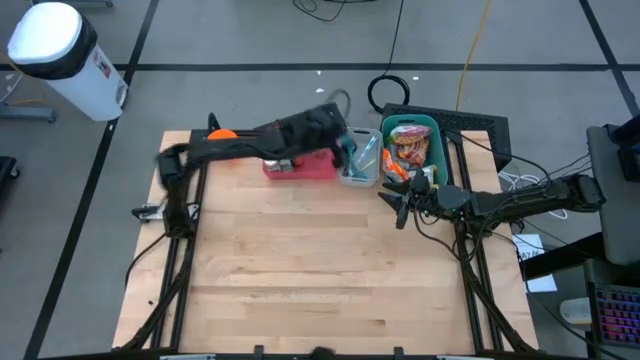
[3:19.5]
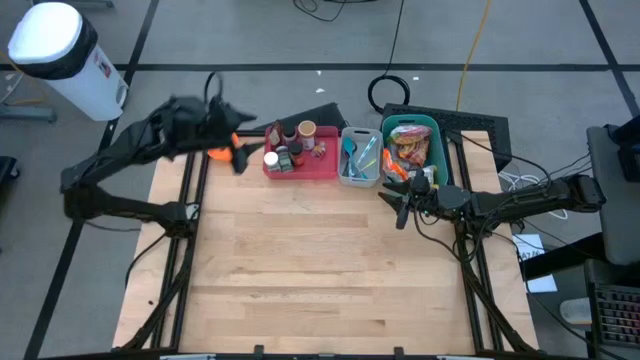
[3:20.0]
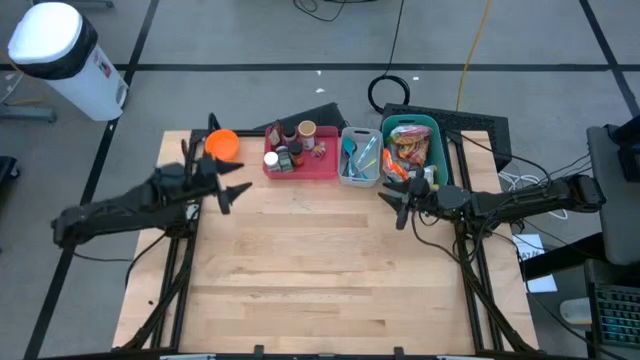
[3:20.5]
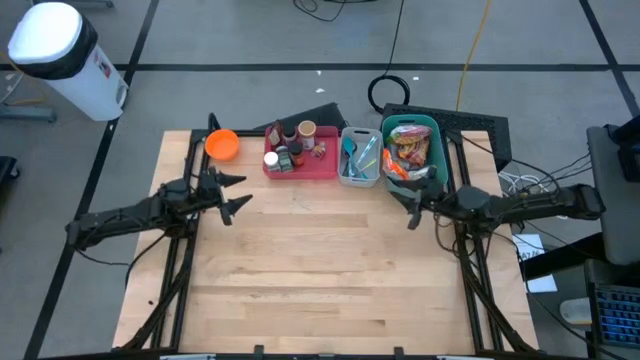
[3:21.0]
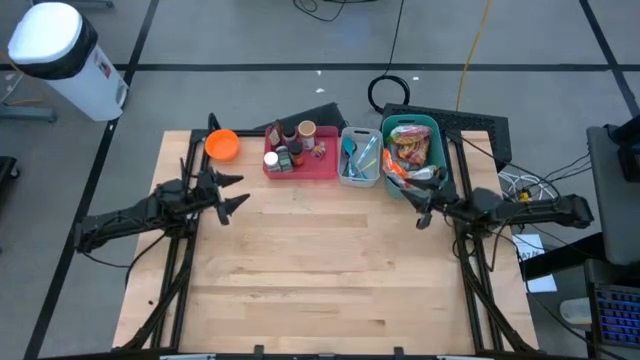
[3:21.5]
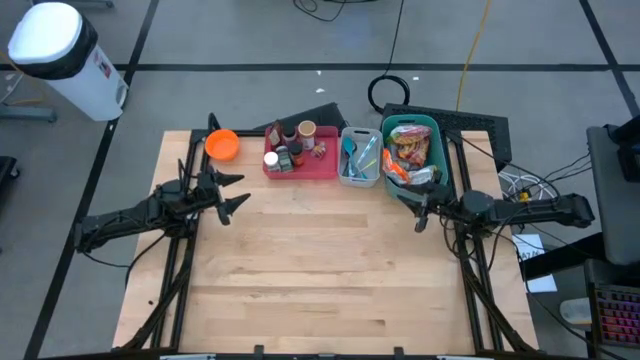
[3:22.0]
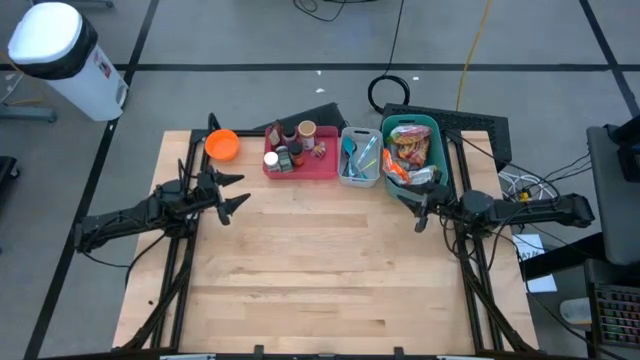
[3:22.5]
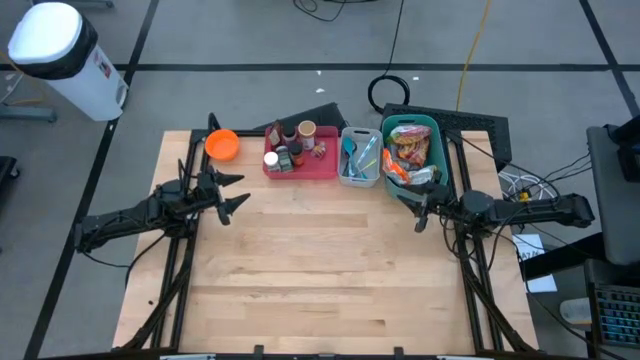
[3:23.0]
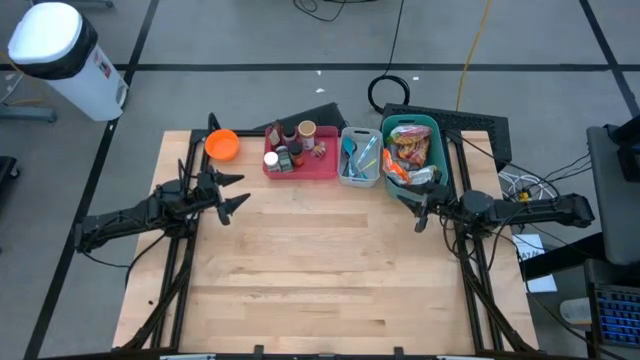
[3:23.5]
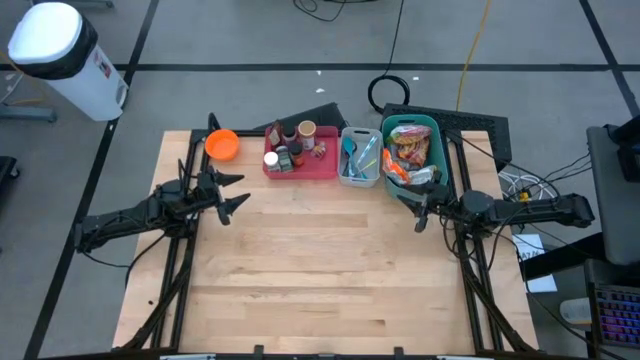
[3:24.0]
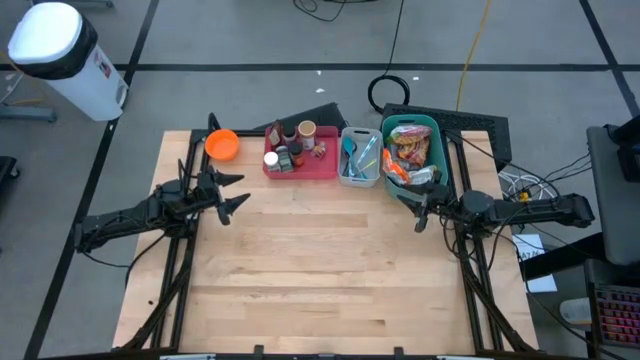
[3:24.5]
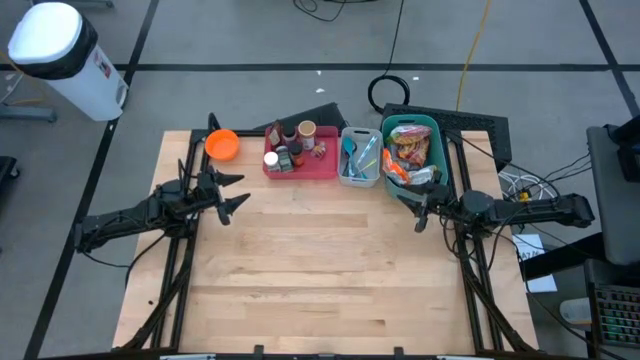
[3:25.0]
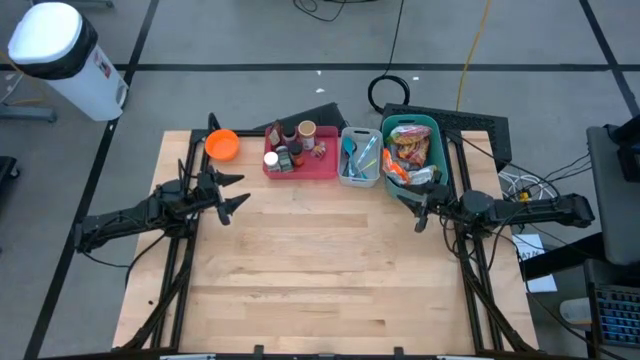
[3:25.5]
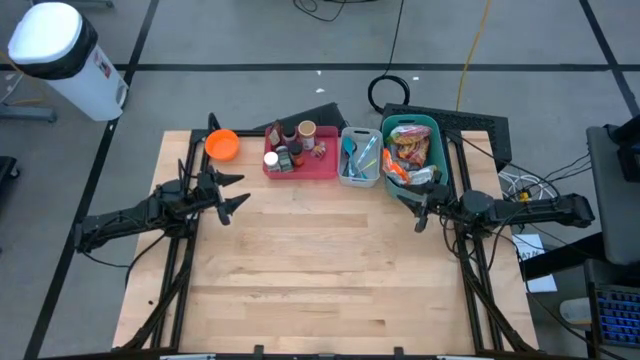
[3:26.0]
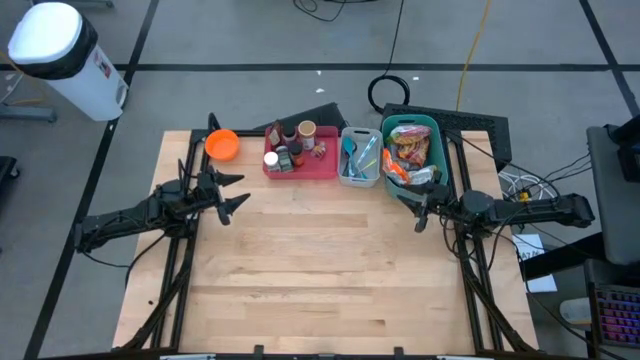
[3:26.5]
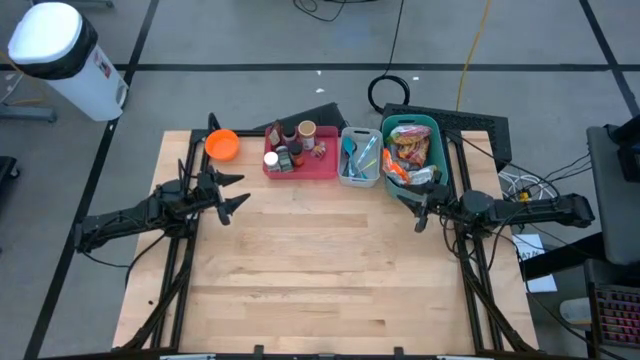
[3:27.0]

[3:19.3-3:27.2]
Task: Pick & Place Food Item
Return to Home Position

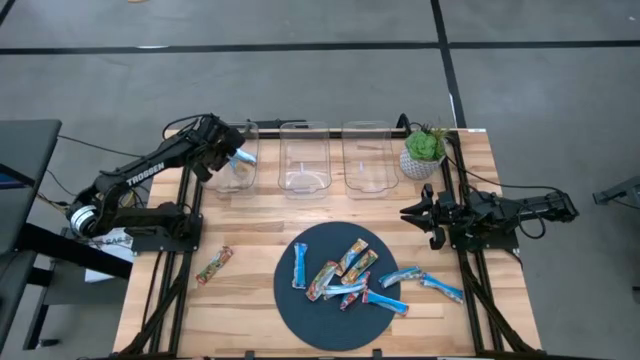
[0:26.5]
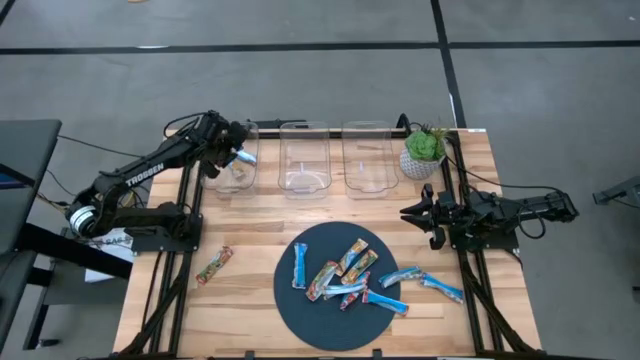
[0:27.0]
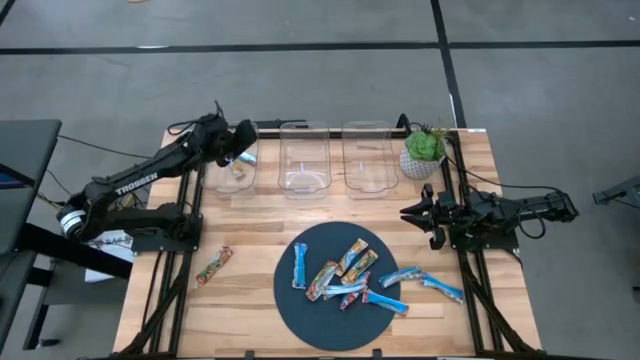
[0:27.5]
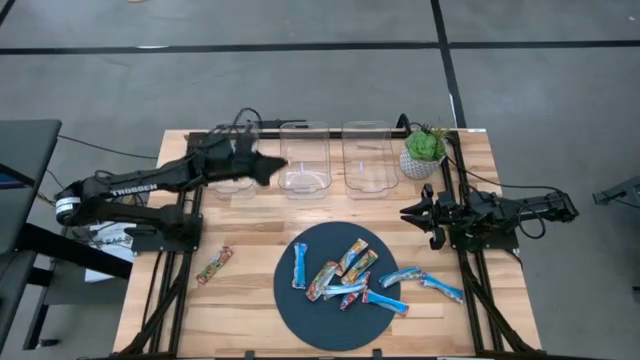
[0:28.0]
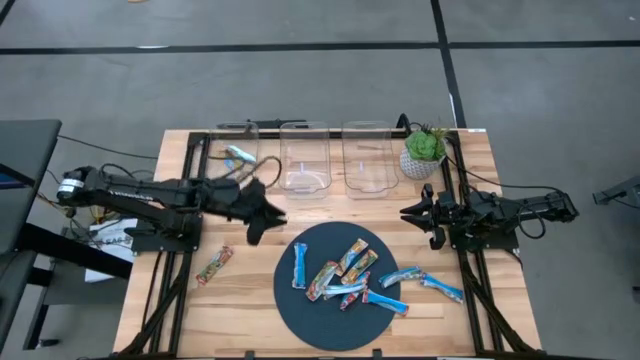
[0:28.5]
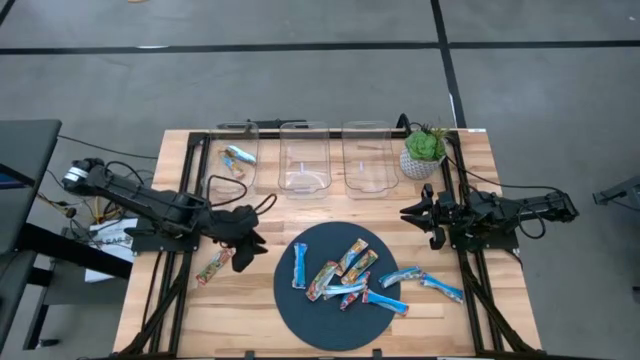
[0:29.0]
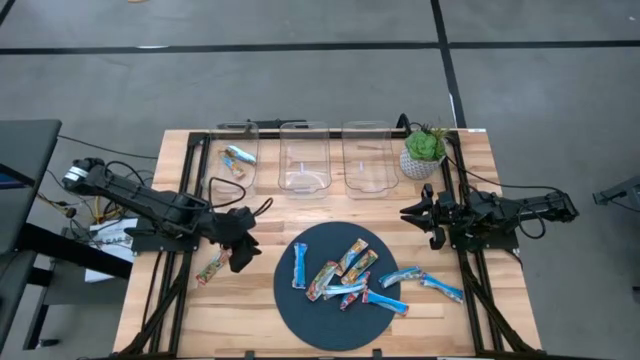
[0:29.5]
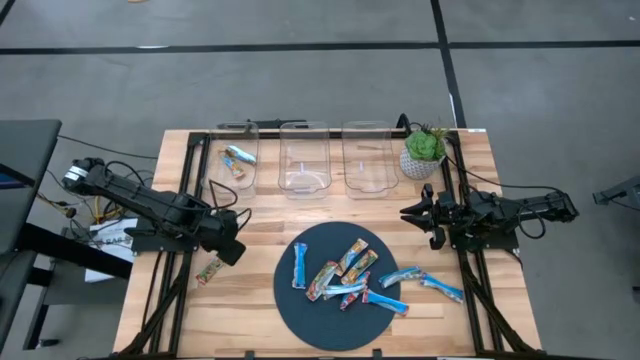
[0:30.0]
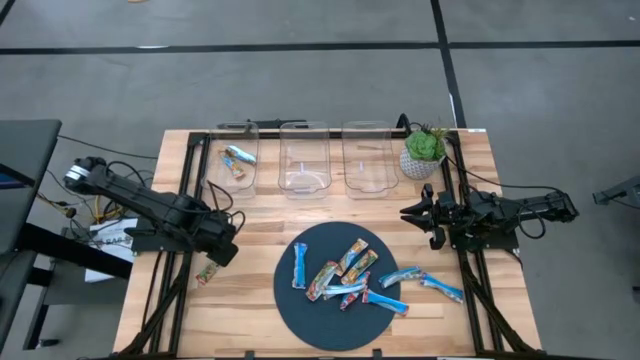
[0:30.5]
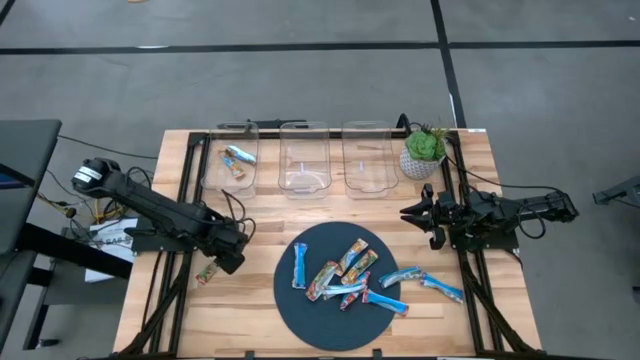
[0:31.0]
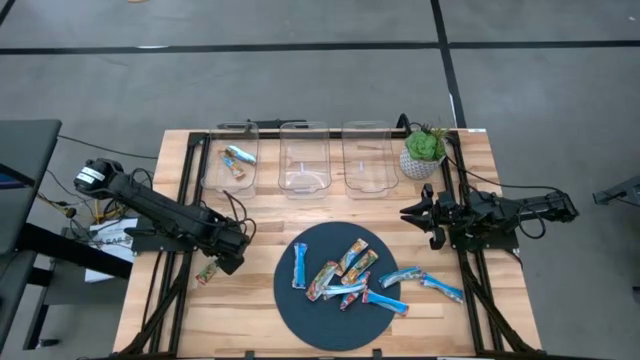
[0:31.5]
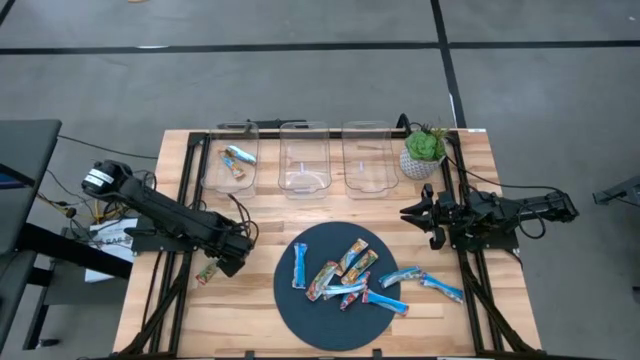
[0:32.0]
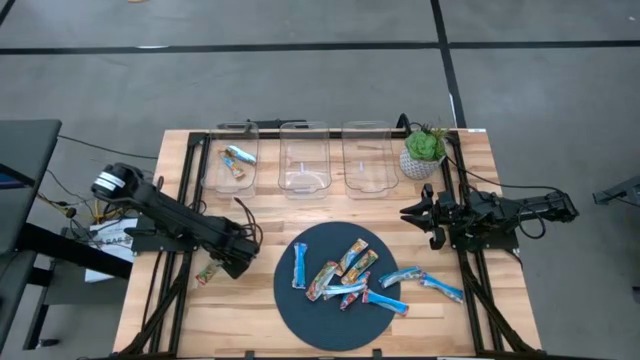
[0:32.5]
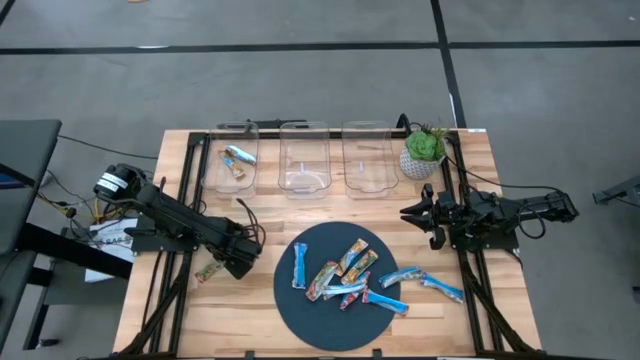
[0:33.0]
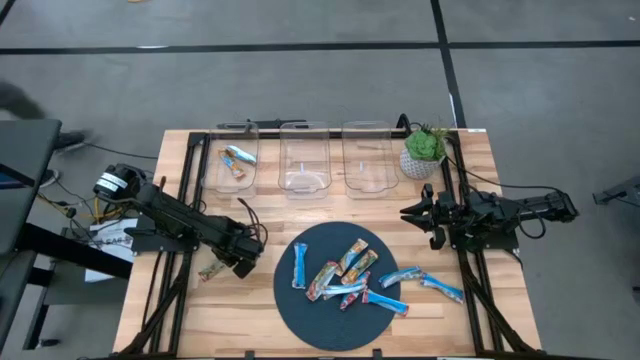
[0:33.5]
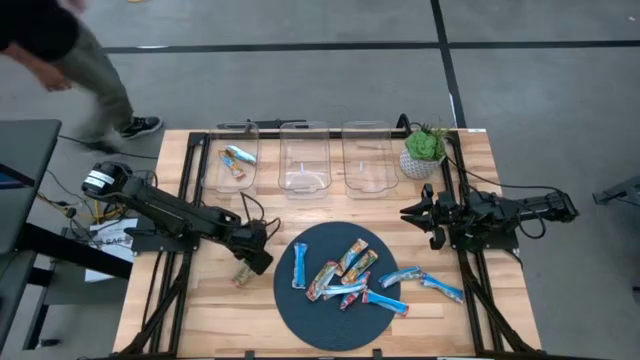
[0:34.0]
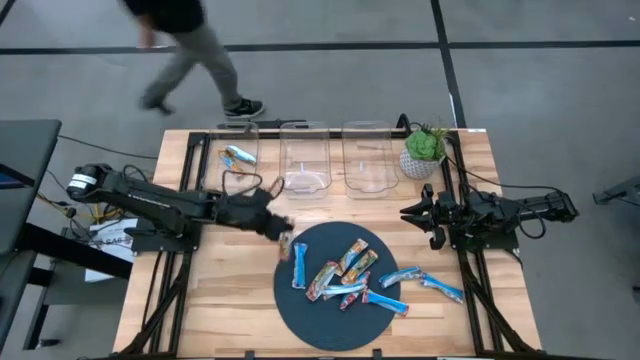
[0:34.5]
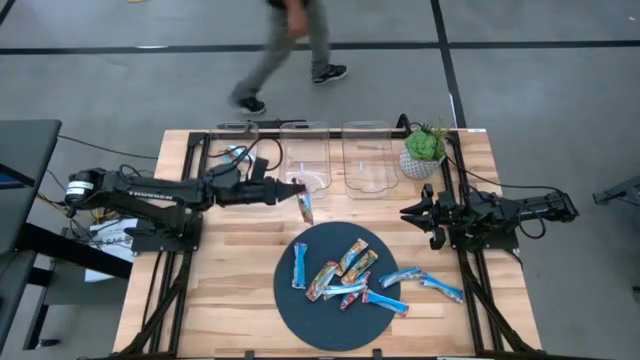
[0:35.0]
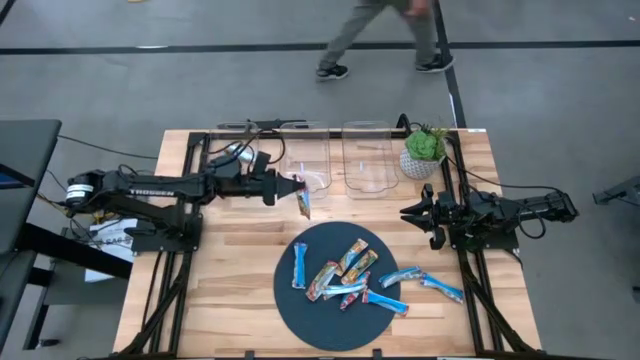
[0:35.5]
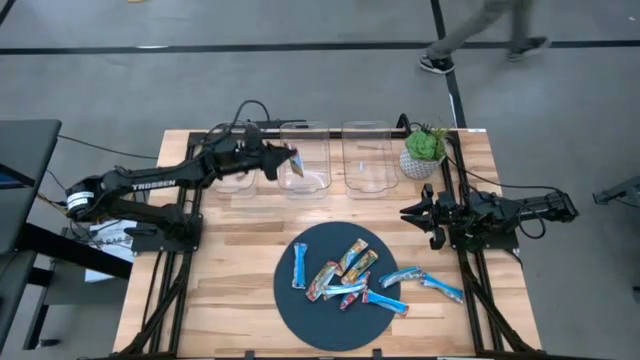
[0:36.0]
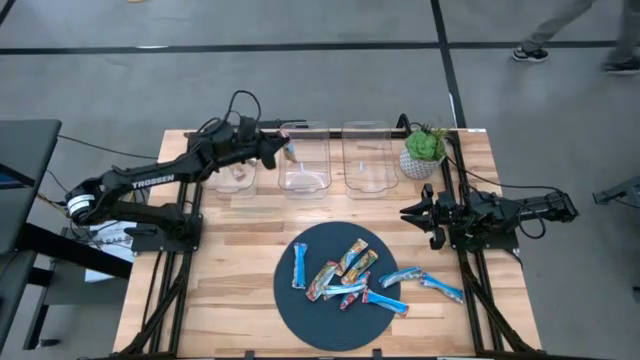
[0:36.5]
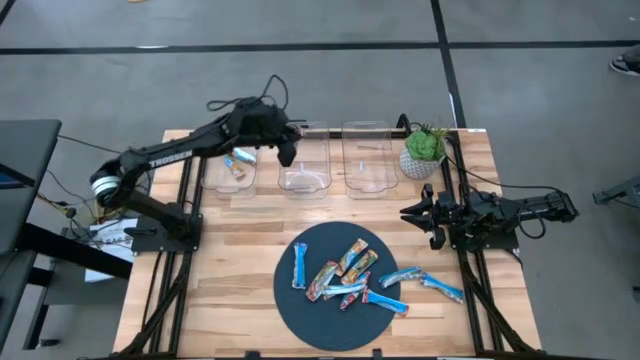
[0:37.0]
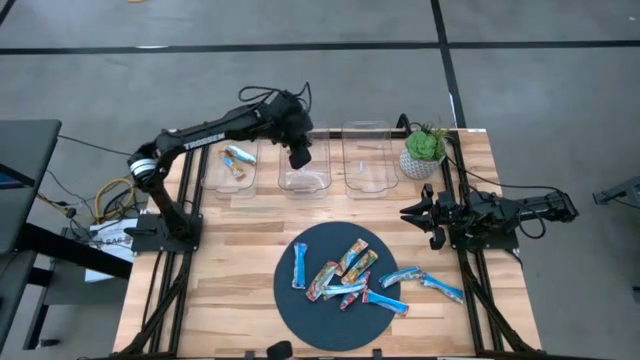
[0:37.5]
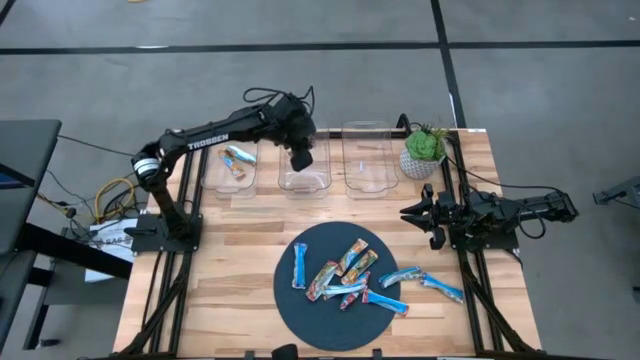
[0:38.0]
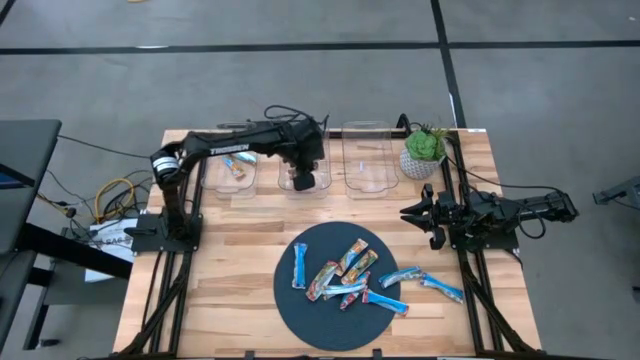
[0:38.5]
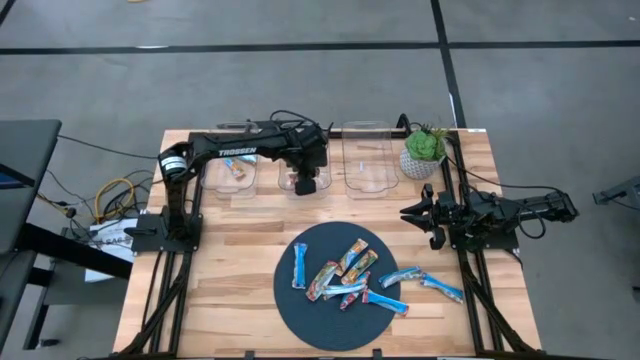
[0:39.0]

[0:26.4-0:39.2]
Task: Pick and place Granola Bars by type
Put the red granola bar into the middle transparent bin
